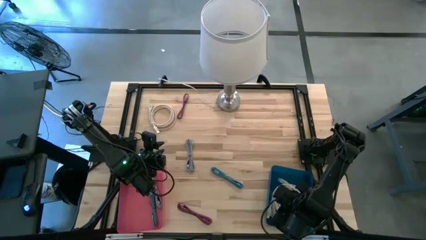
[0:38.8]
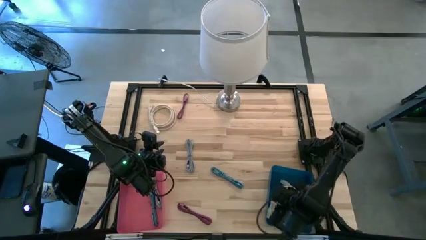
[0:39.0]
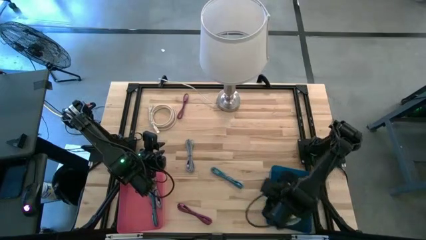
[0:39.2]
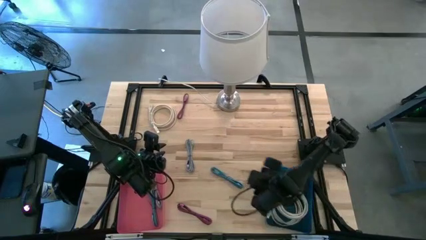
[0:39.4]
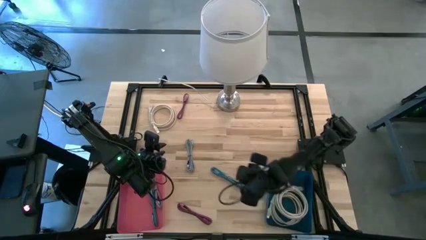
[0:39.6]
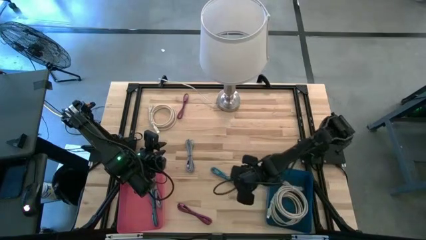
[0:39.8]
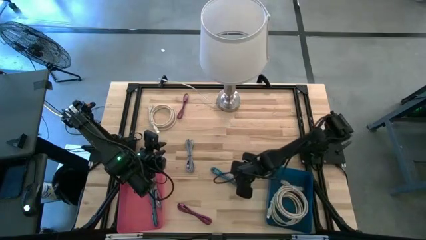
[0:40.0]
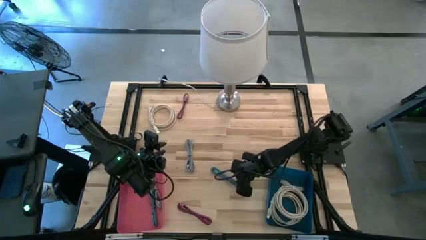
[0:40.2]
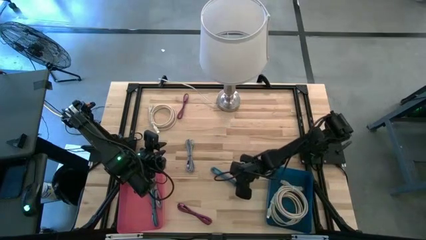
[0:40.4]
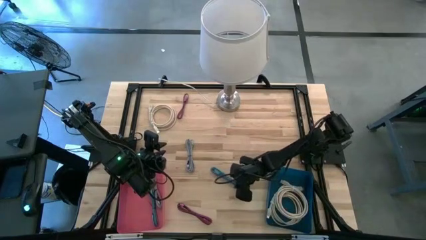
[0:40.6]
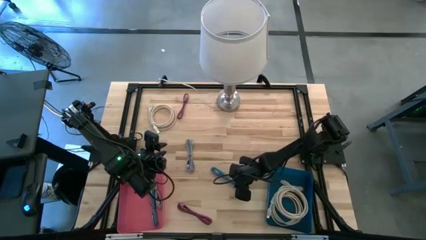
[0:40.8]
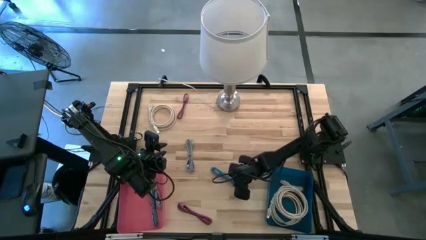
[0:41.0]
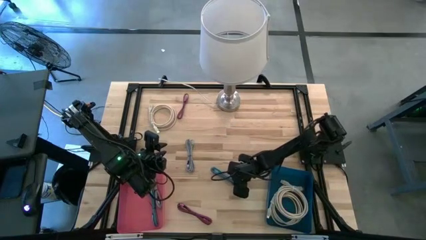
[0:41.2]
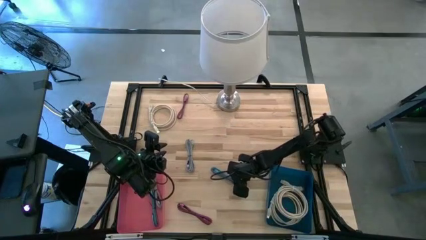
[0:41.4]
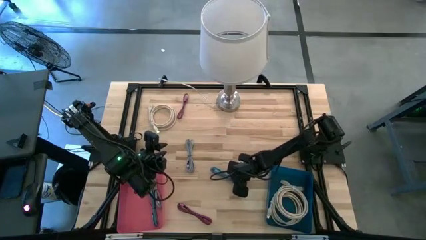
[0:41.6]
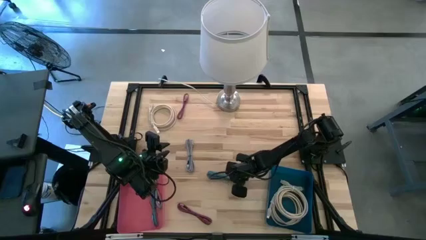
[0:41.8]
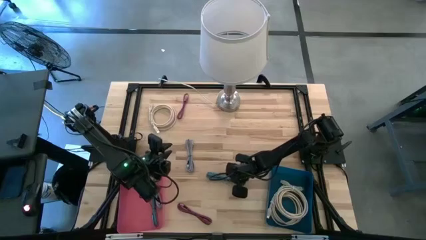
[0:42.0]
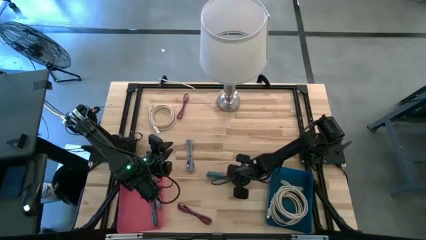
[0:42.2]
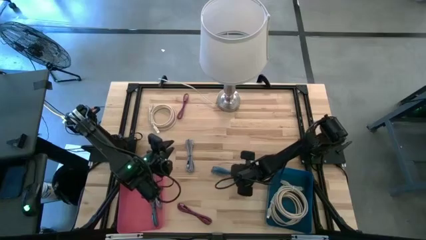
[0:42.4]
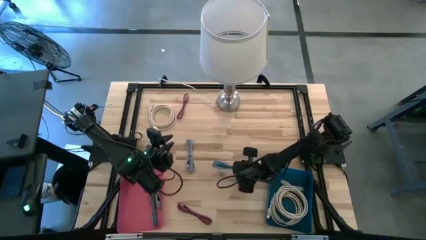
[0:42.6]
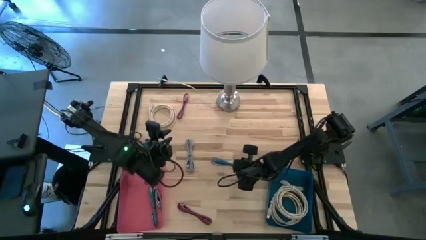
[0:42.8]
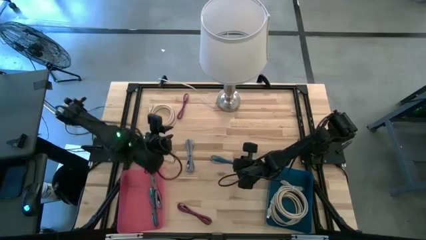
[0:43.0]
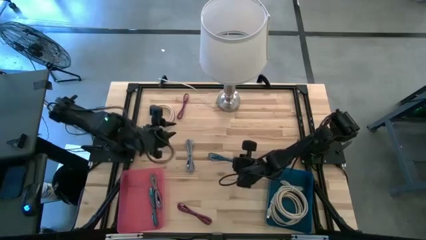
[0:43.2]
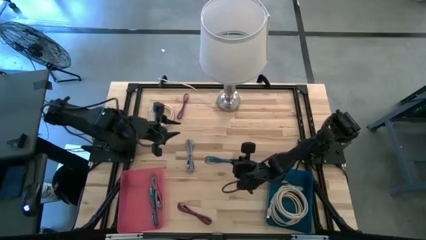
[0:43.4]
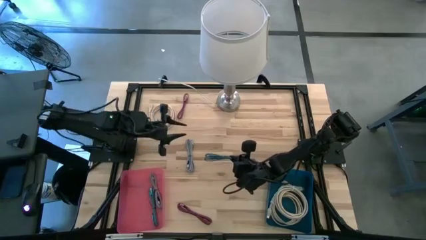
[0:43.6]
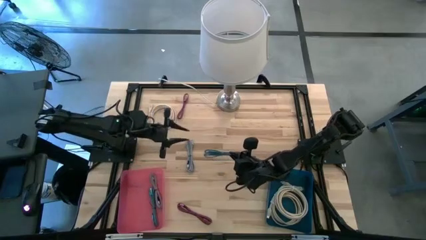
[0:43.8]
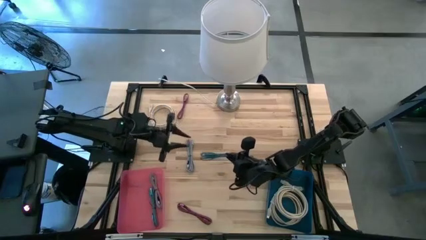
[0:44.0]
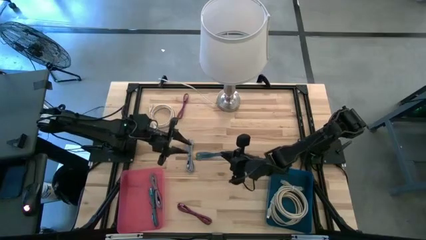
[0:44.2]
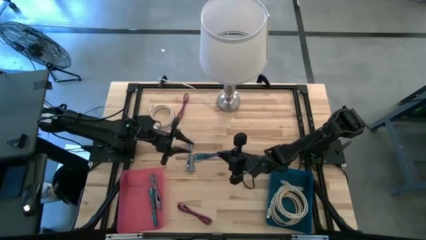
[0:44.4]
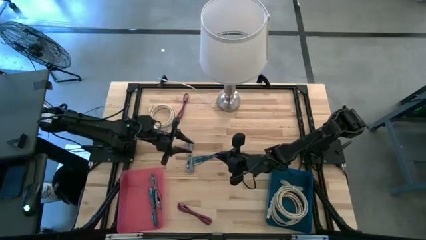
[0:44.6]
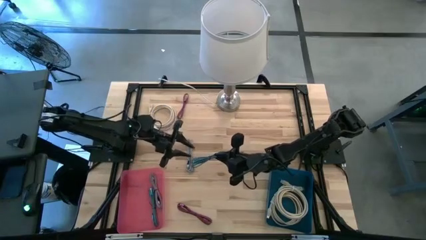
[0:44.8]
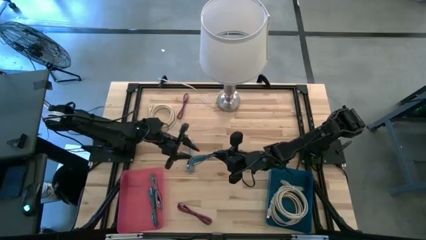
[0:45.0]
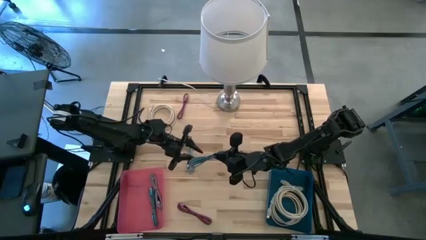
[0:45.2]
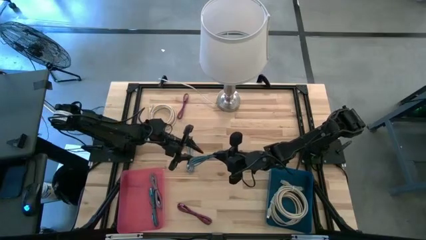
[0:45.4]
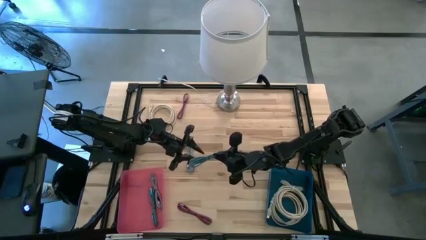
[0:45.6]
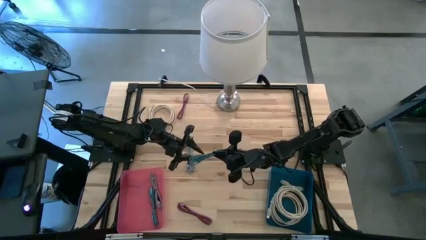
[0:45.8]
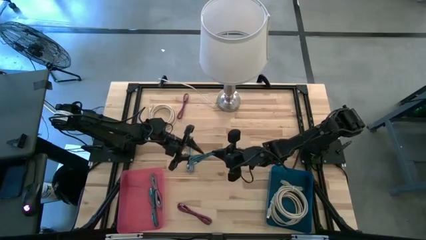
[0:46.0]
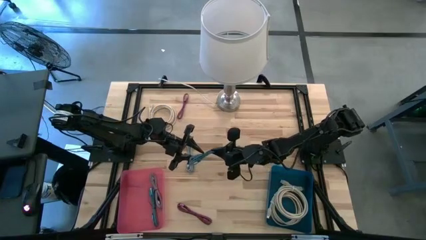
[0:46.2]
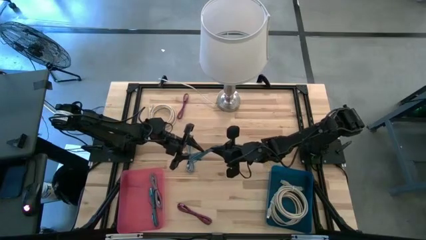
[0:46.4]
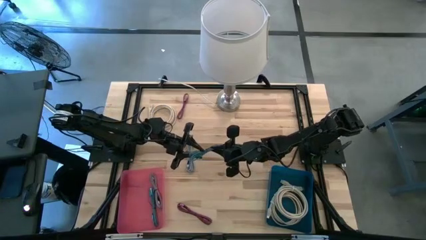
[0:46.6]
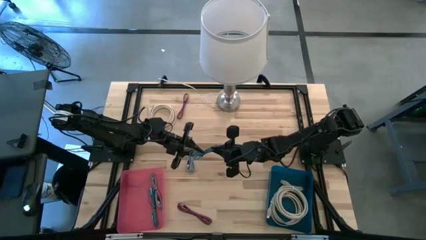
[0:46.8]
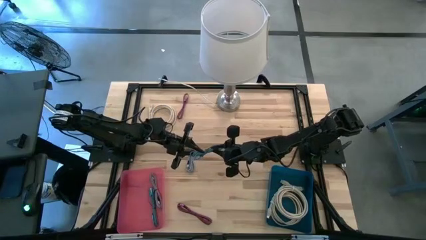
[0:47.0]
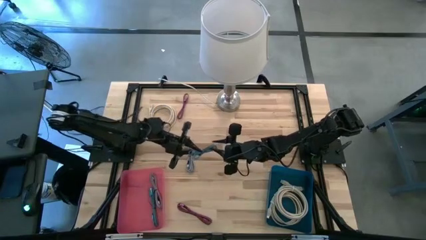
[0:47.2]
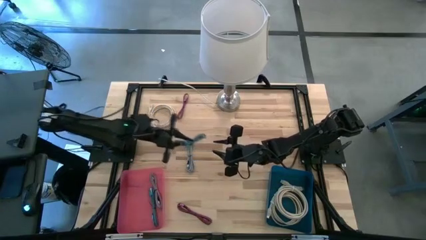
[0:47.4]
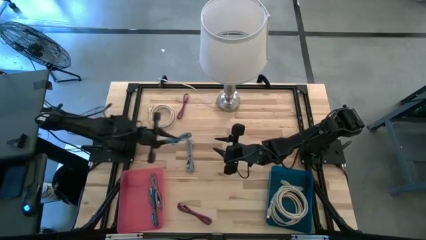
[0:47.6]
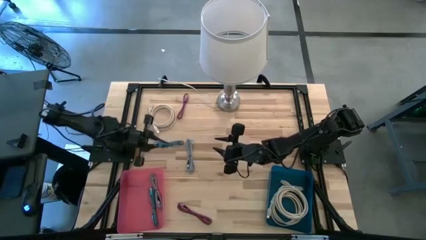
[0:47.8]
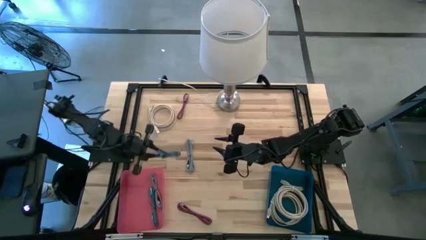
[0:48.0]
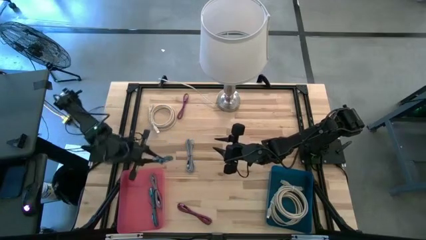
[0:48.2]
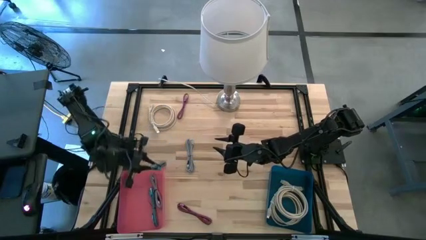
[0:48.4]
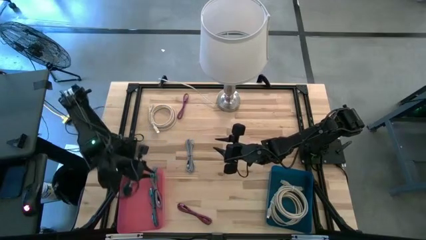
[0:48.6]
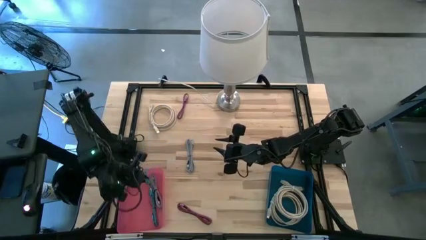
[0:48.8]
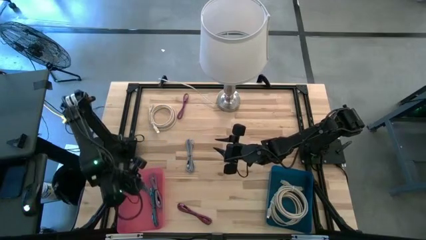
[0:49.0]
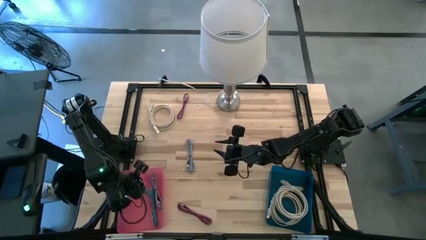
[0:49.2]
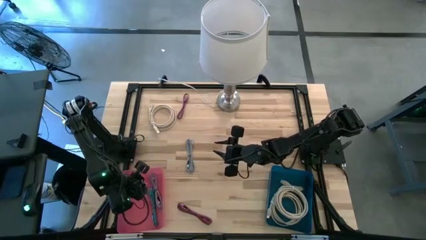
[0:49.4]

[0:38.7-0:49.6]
Task: Pick & Place USB Port
Put the blue and black USB cable into the pink bin

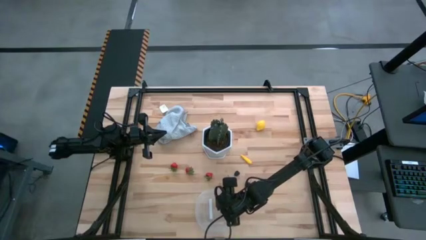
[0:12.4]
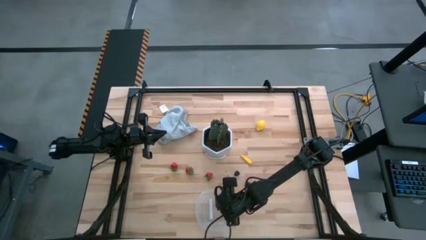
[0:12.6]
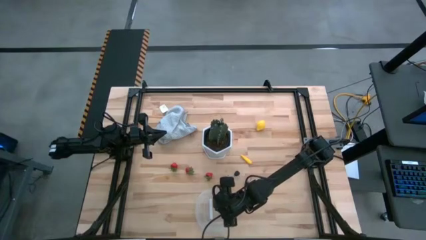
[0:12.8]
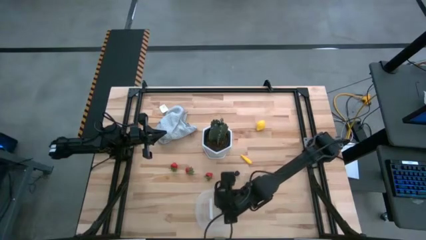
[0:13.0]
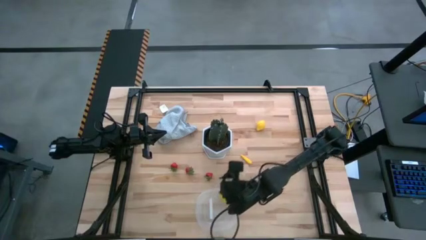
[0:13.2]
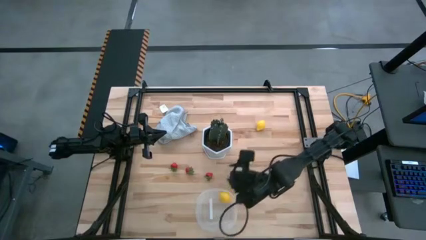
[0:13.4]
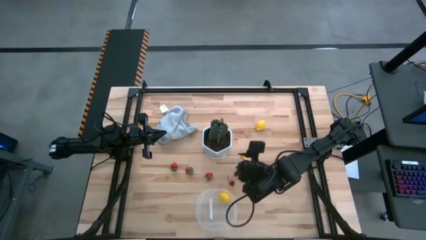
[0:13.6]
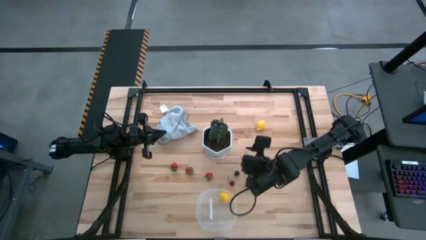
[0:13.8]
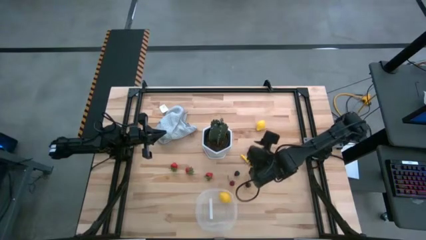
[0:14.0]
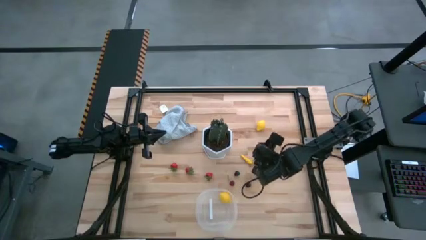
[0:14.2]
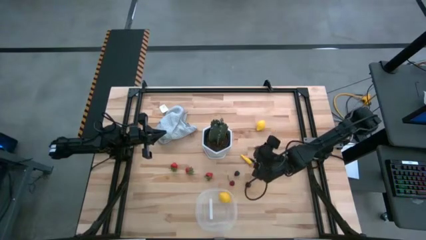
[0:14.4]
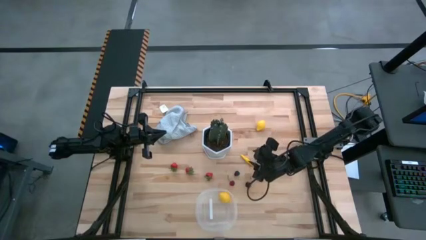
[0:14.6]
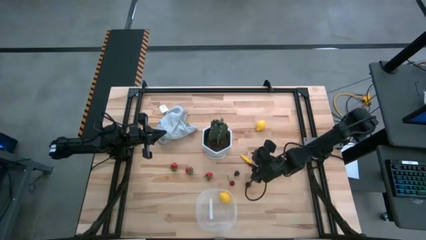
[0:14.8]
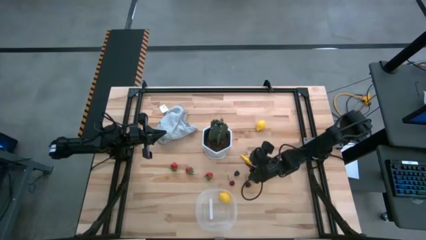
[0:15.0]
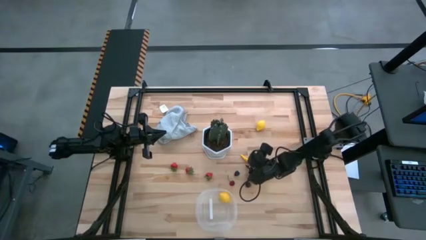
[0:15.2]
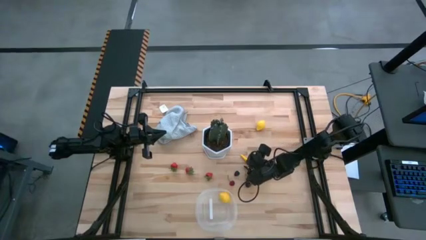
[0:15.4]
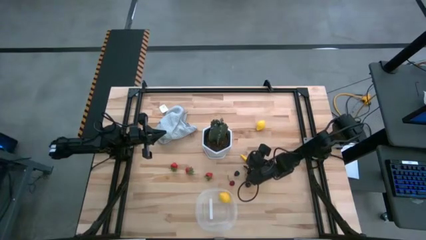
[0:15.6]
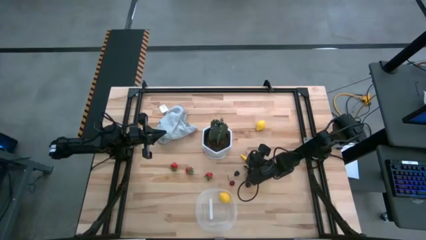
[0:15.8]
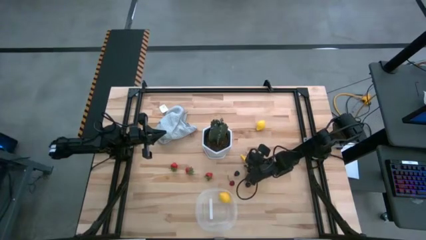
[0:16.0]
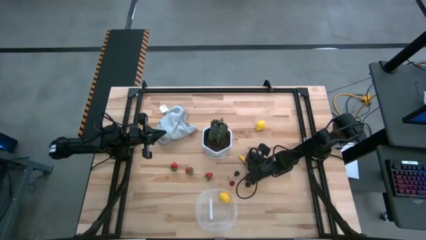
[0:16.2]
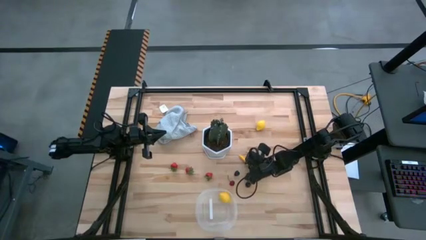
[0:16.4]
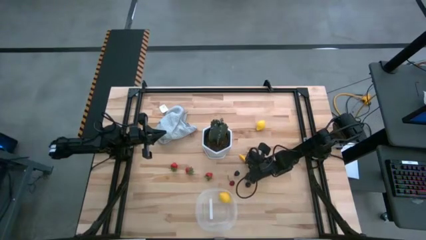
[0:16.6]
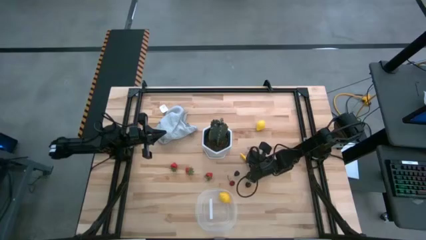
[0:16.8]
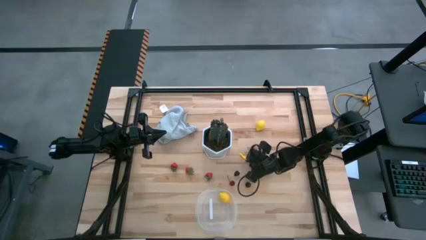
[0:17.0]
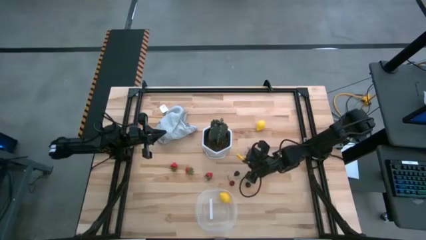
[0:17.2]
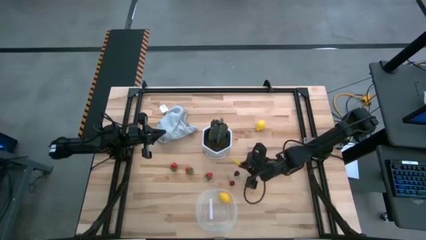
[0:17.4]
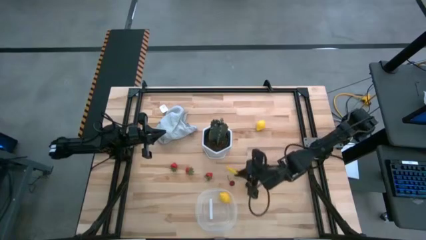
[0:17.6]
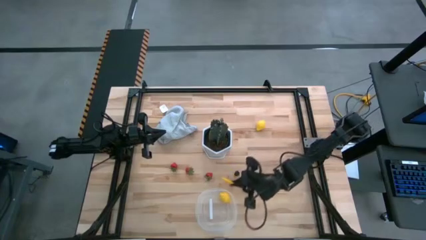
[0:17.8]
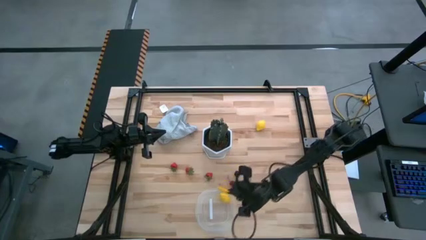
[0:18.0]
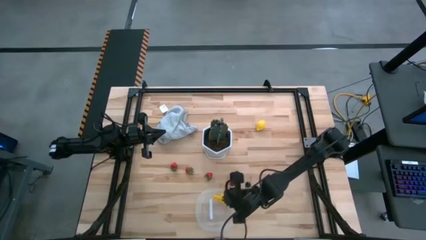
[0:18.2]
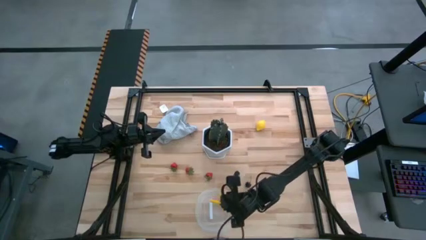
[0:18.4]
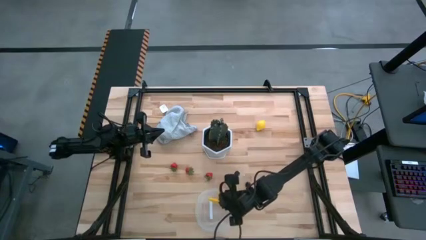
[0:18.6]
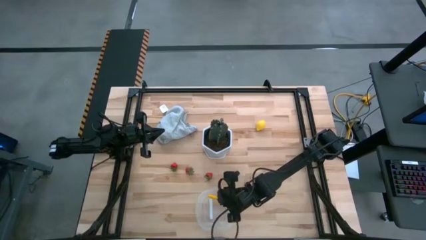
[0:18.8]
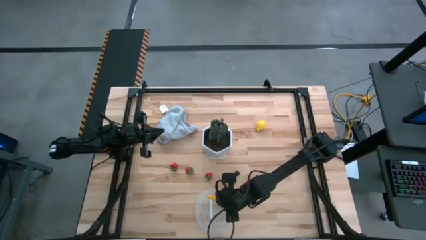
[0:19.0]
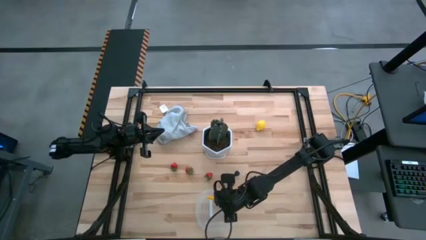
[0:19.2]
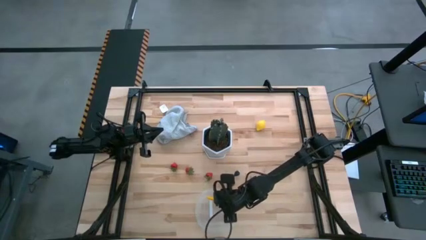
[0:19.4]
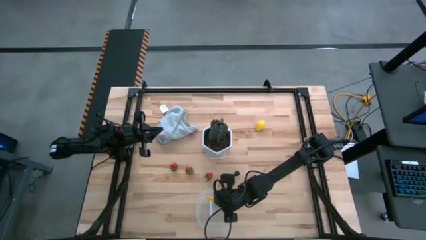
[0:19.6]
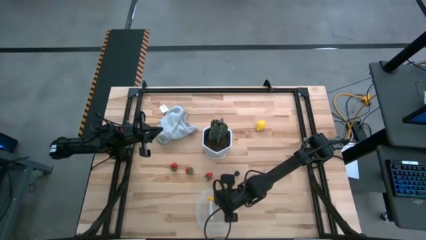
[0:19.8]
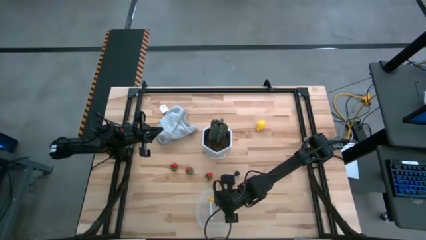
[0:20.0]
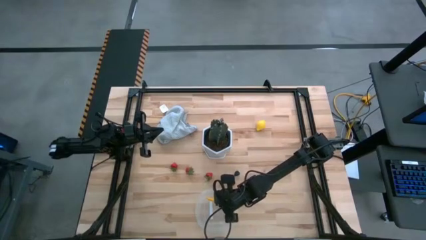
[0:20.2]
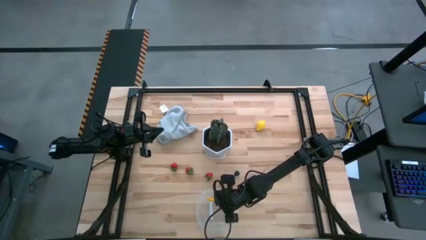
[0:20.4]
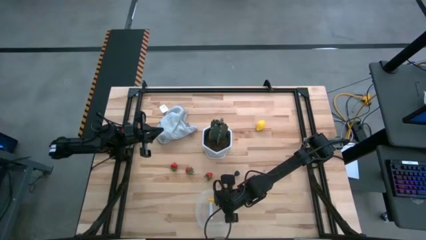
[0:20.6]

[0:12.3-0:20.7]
Task: Pick and placing Produce into tupperware
Put the yellow corn into the transparent bin
